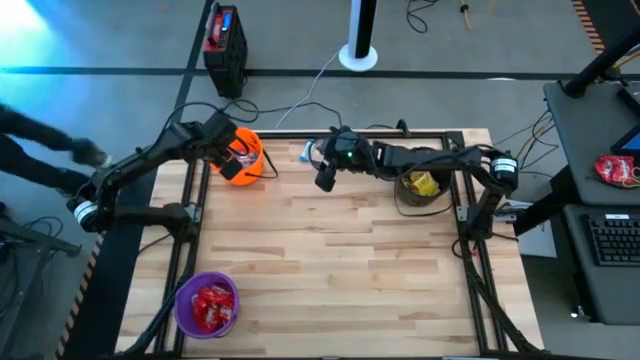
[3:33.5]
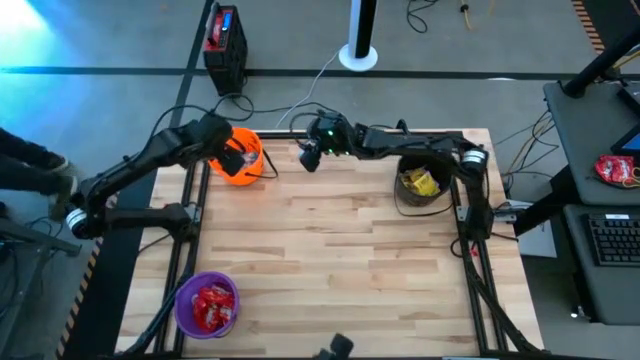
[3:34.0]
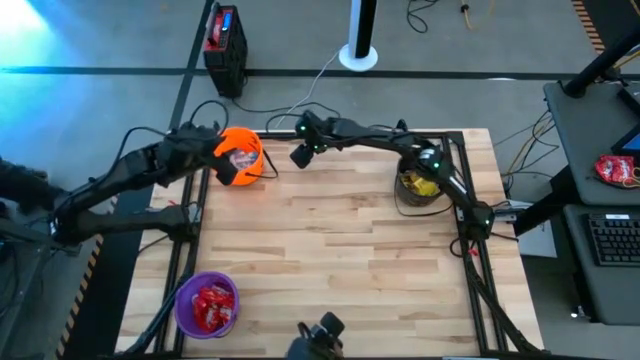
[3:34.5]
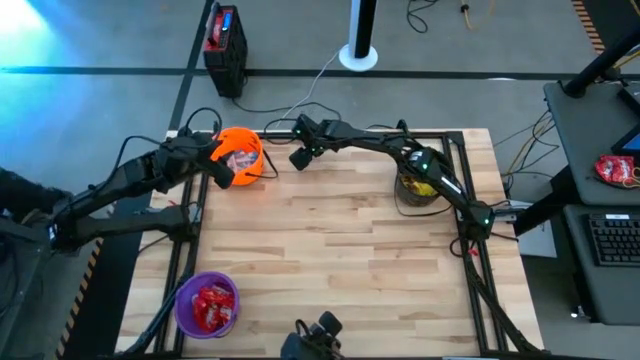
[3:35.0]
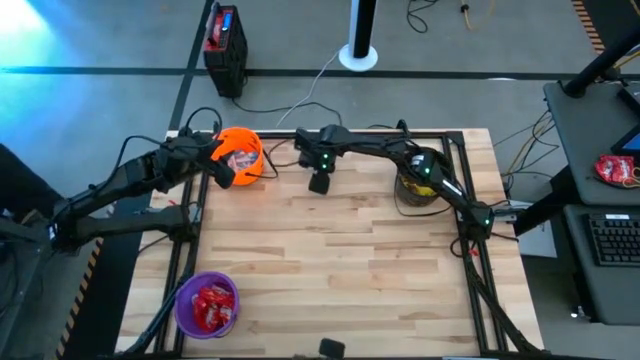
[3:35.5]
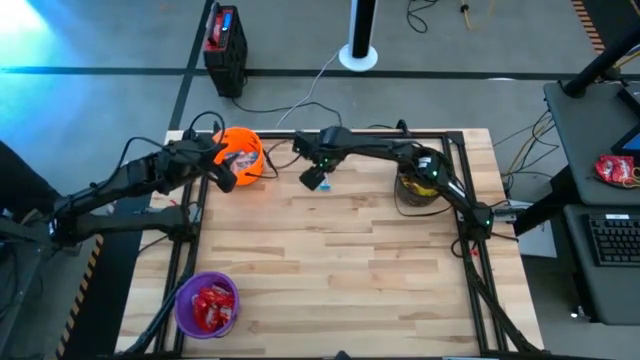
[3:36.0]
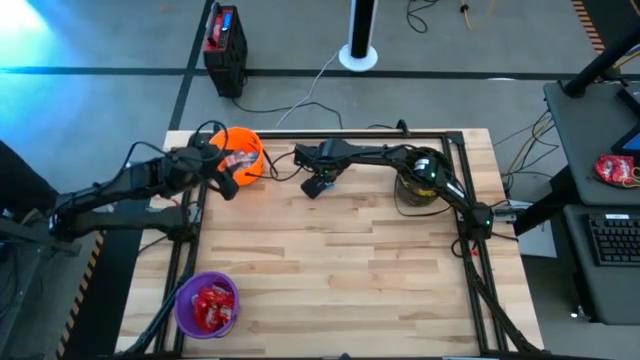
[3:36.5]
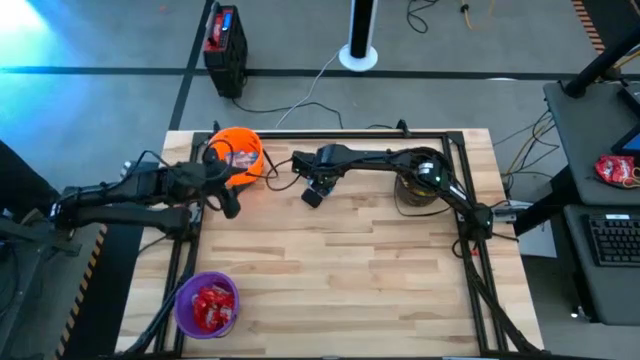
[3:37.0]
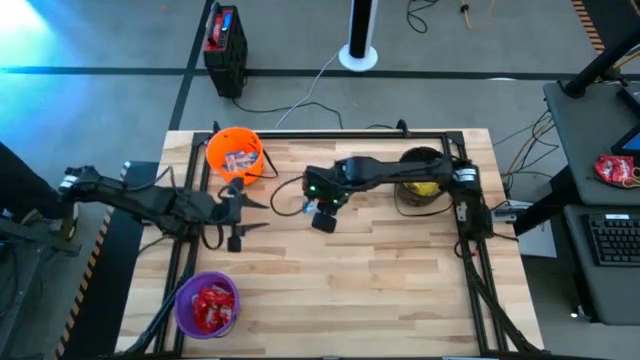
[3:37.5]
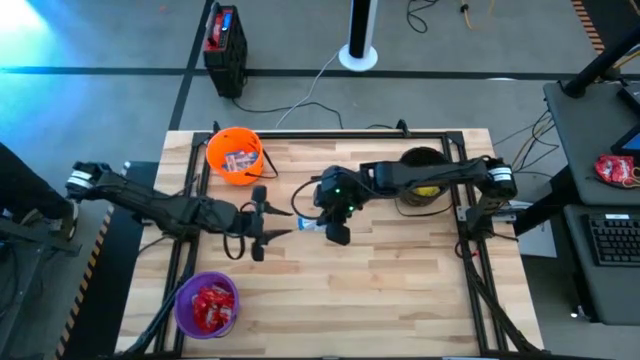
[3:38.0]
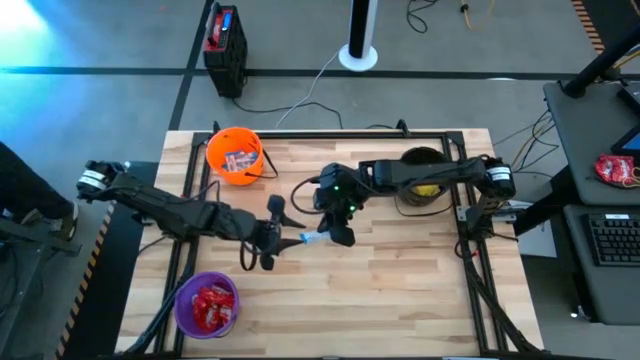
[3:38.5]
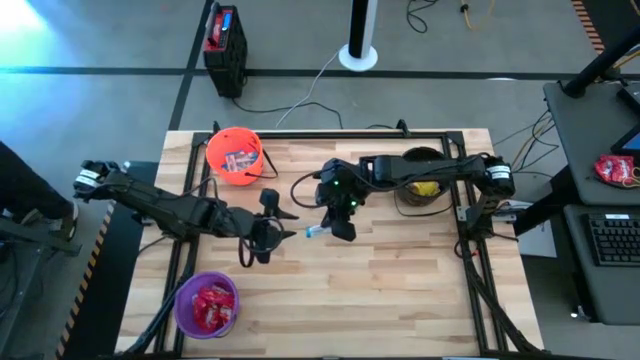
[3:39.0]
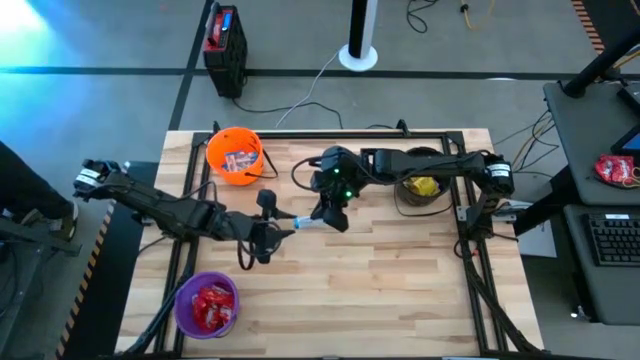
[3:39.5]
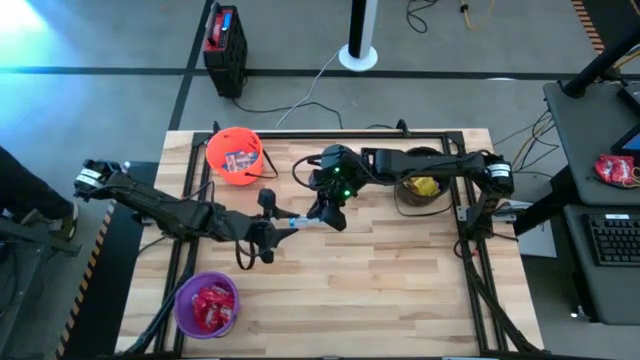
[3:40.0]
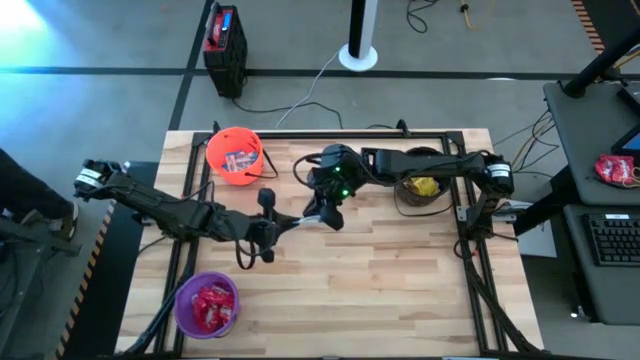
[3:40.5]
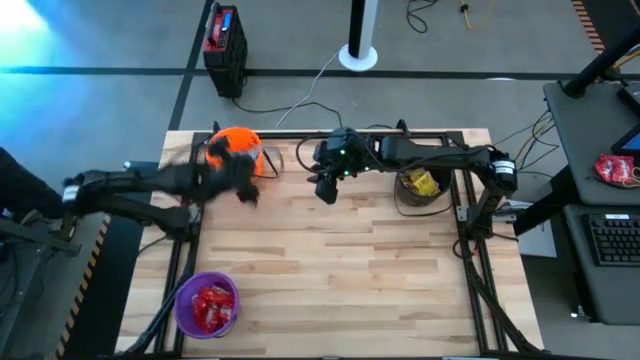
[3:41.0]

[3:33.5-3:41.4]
Task: Sort candy by brand, put in halloween buckets
Put the white chocolate bar into the orange bucket

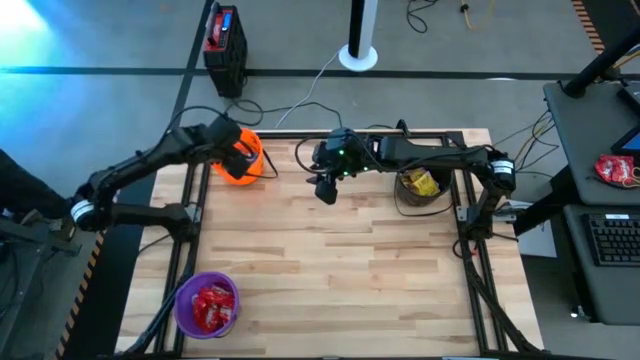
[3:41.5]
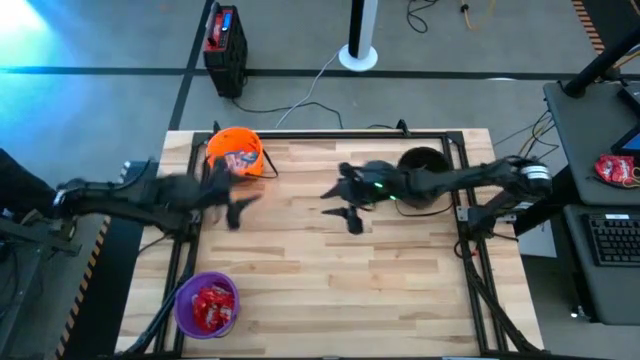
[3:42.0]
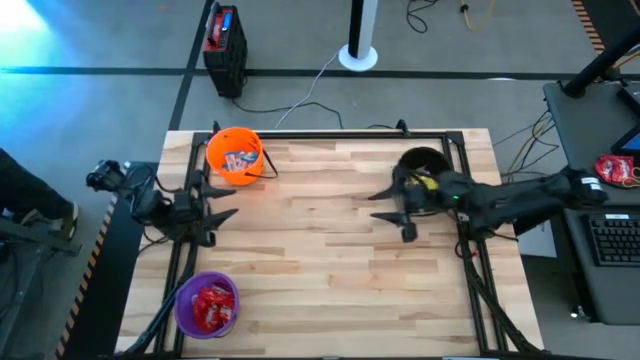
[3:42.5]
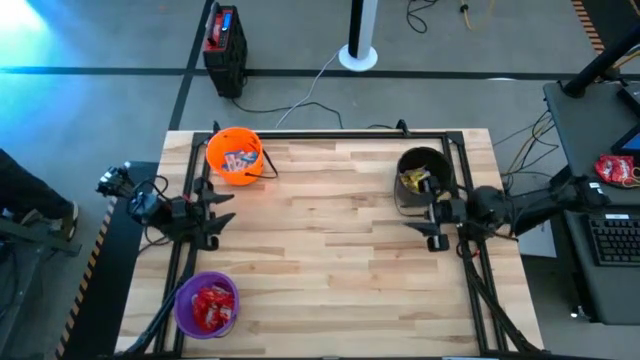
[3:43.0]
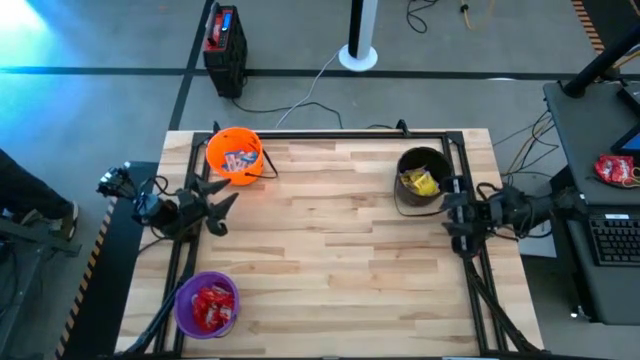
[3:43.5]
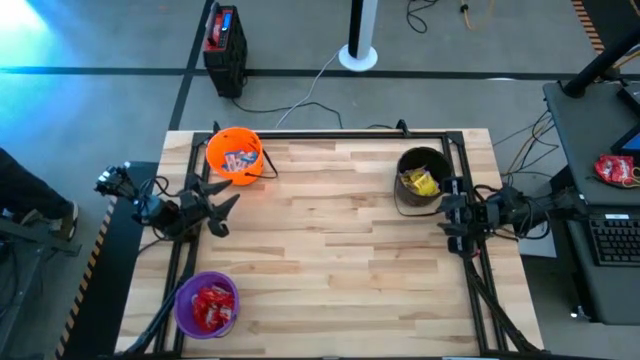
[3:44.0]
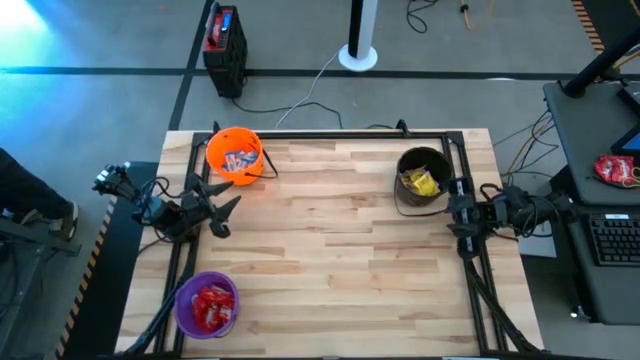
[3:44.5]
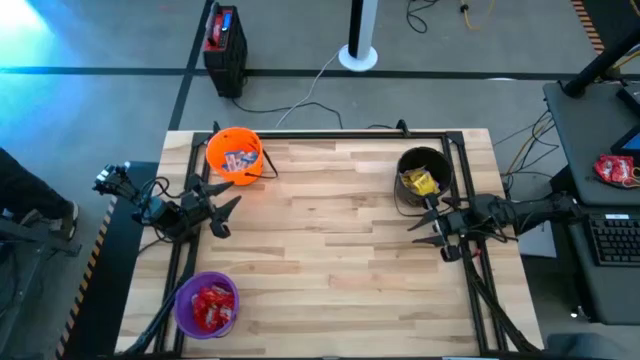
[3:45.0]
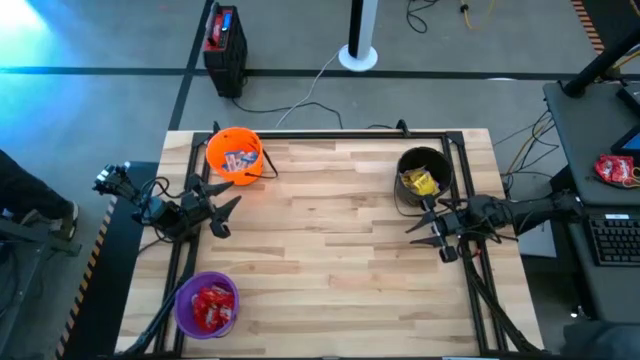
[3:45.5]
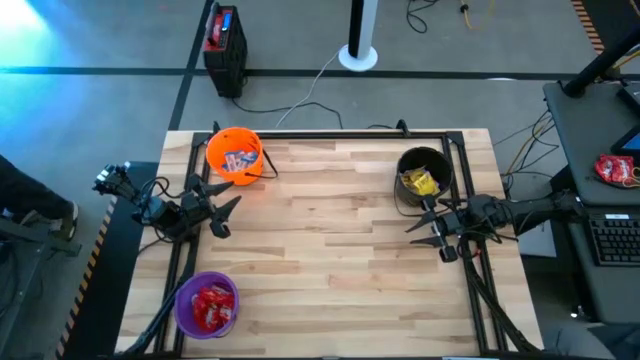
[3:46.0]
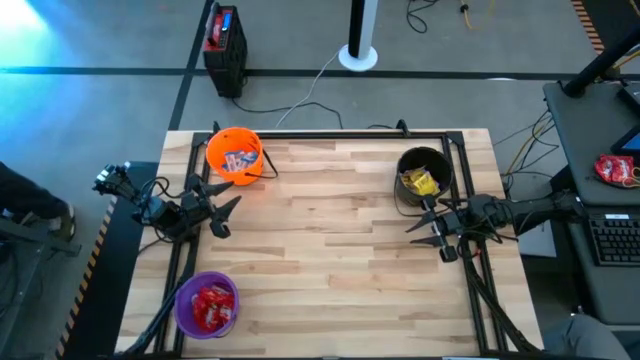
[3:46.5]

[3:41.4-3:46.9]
Return to Home Position

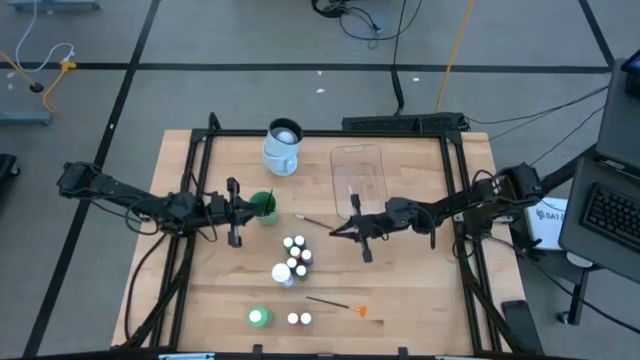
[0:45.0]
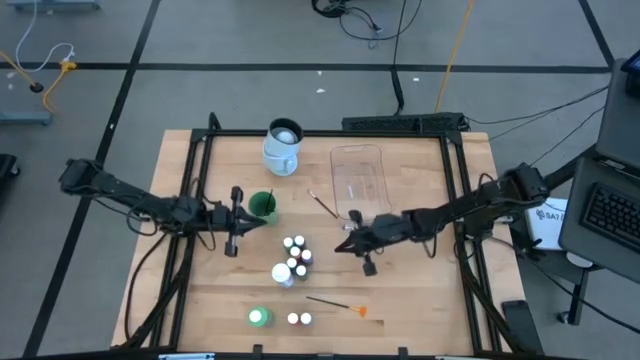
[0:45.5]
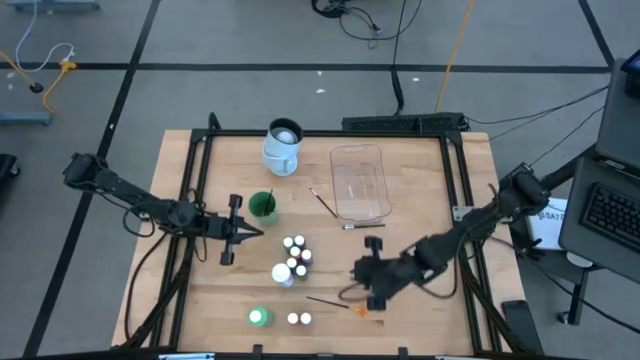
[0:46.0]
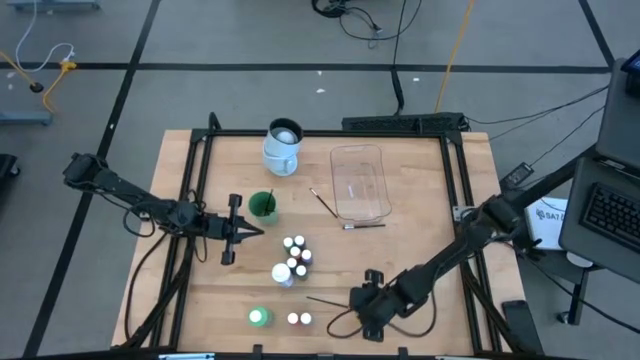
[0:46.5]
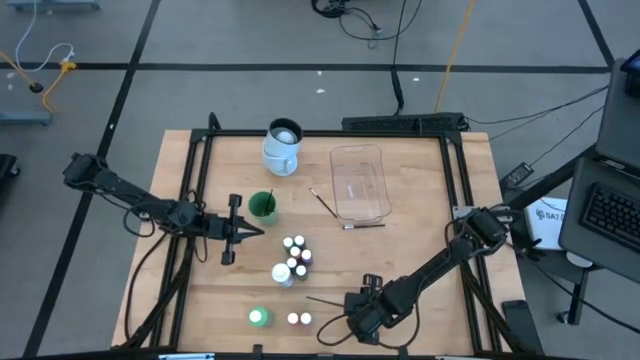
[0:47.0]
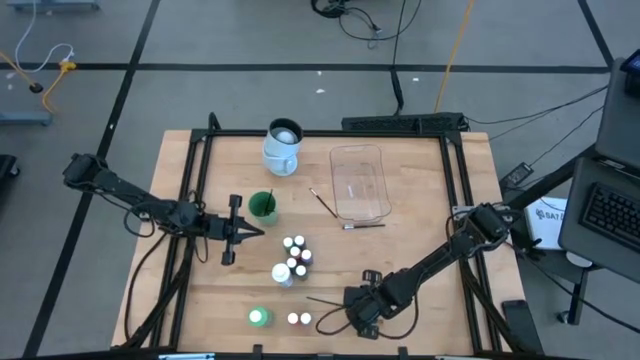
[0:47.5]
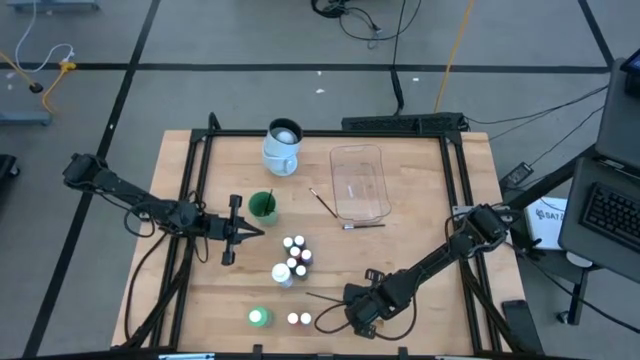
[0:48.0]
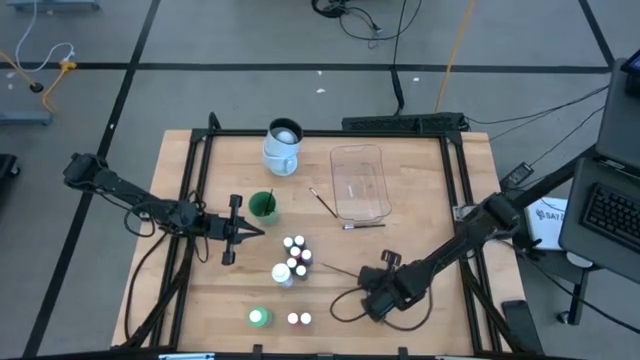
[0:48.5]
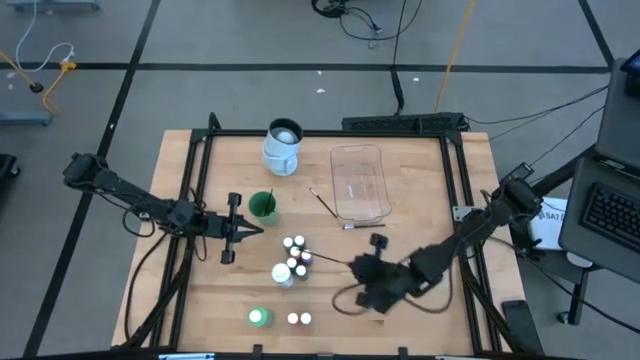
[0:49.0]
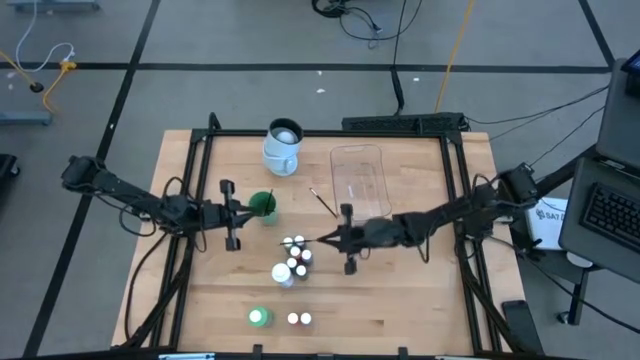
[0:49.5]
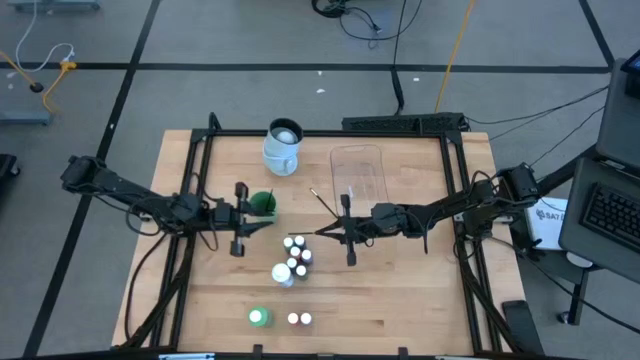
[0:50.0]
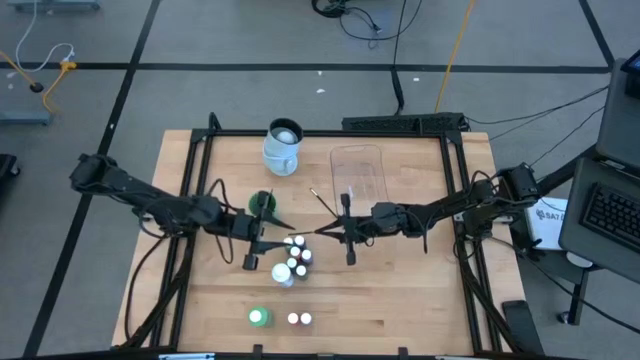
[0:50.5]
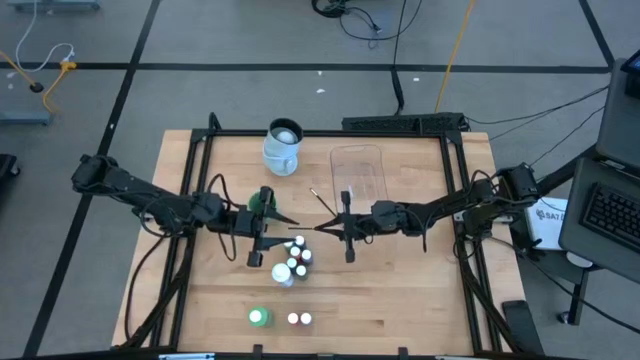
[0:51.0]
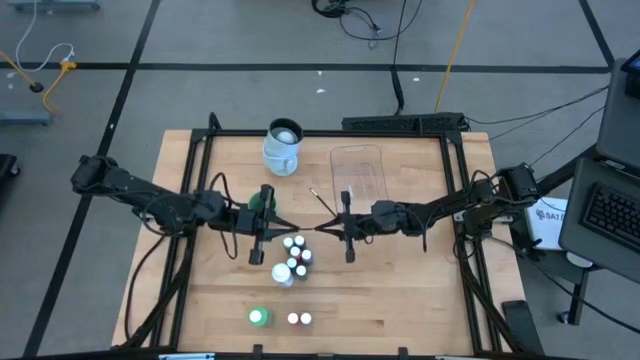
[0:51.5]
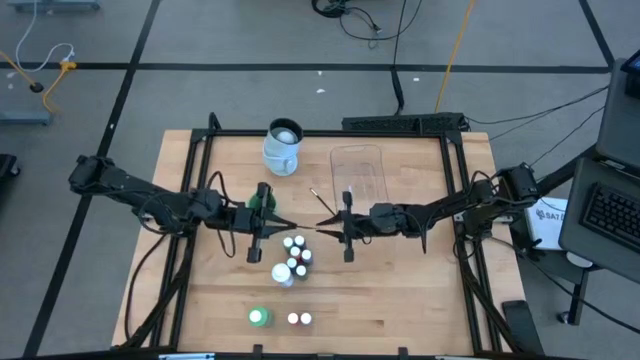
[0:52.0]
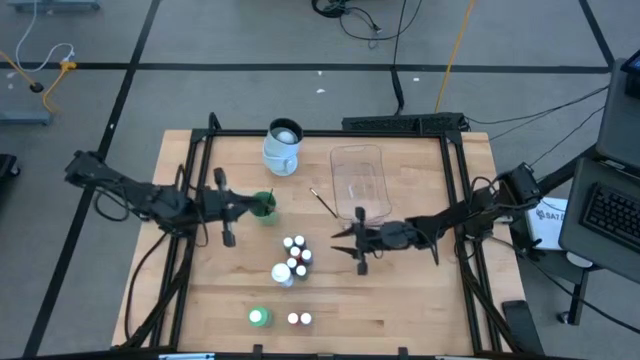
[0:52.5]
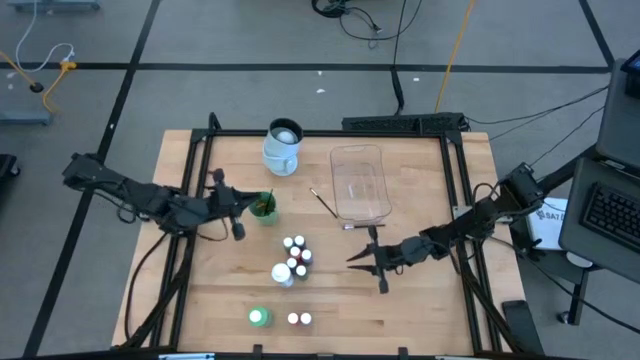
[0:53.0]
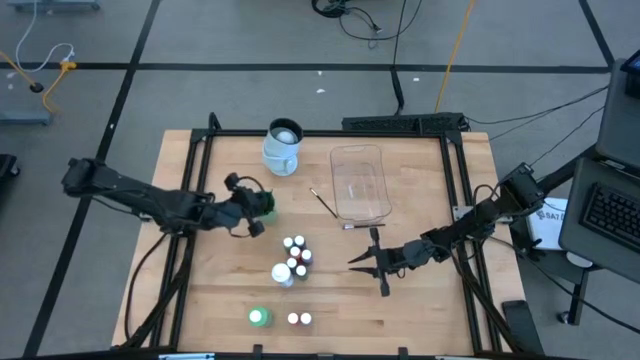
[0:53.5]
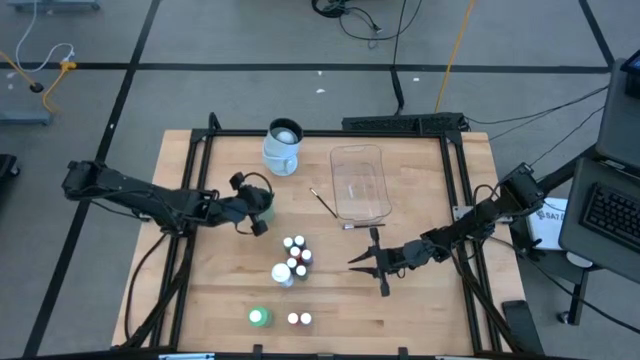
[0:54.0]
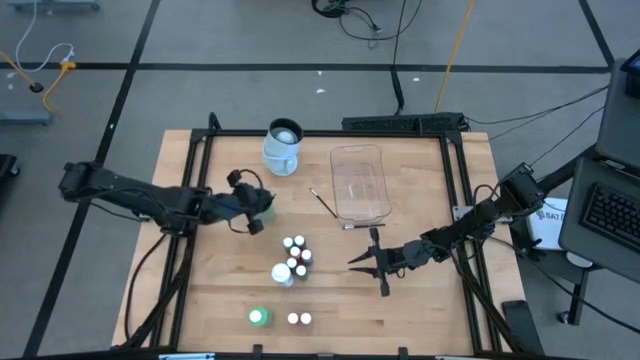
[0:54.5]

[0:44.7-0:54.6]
Task: Pick & Place Paint Supplies
Put the gold paintbrush into the green cup
